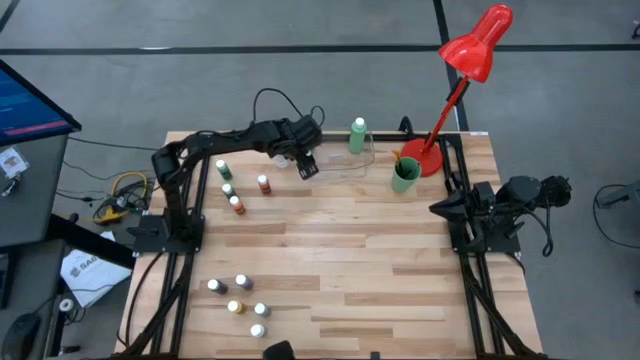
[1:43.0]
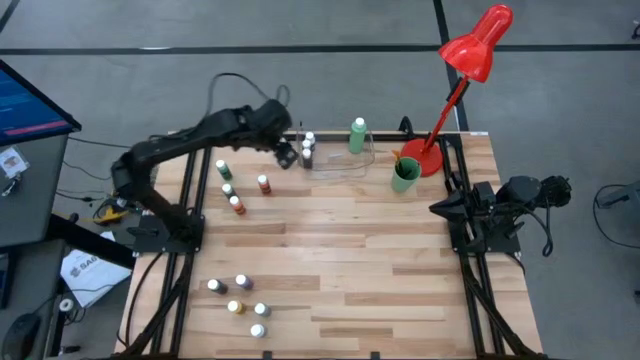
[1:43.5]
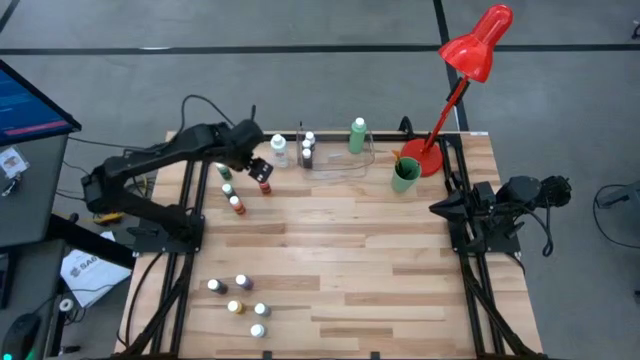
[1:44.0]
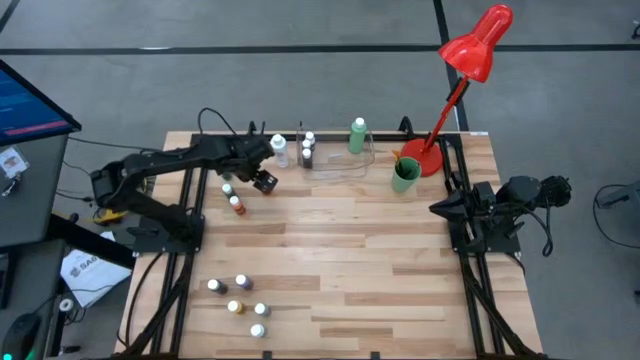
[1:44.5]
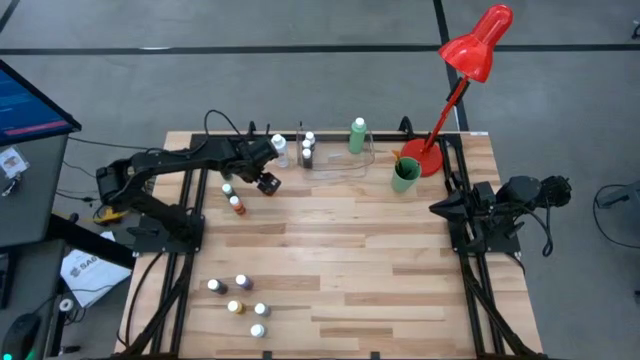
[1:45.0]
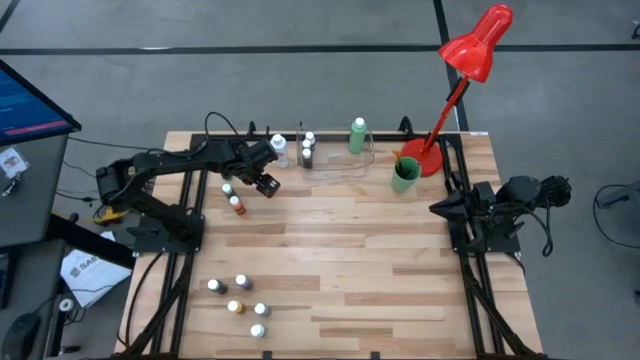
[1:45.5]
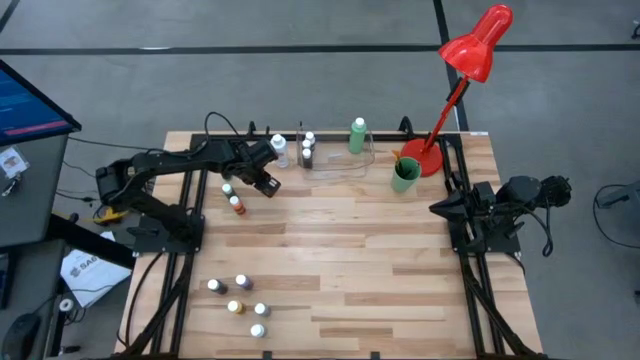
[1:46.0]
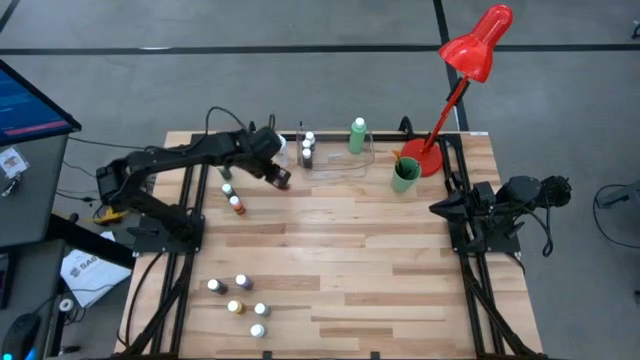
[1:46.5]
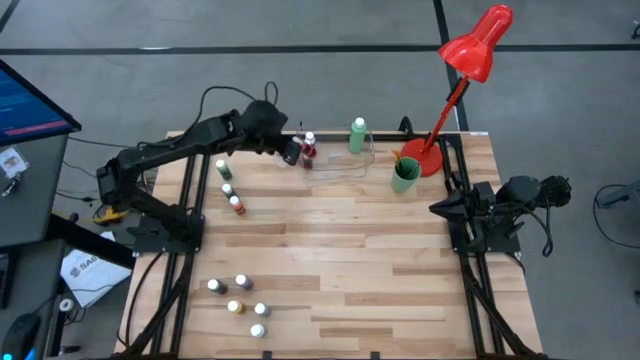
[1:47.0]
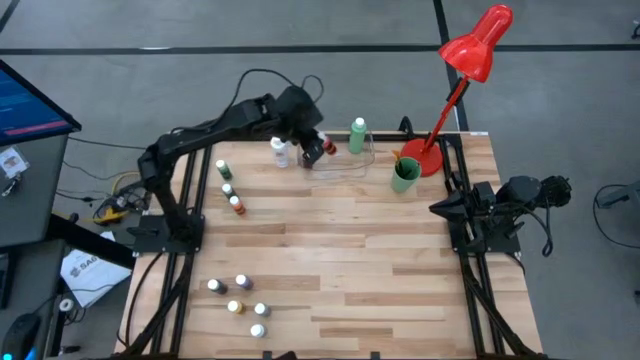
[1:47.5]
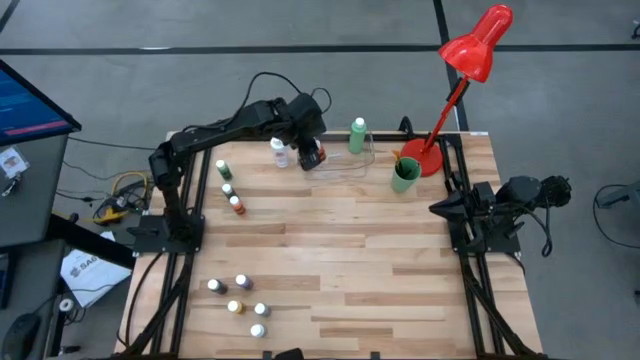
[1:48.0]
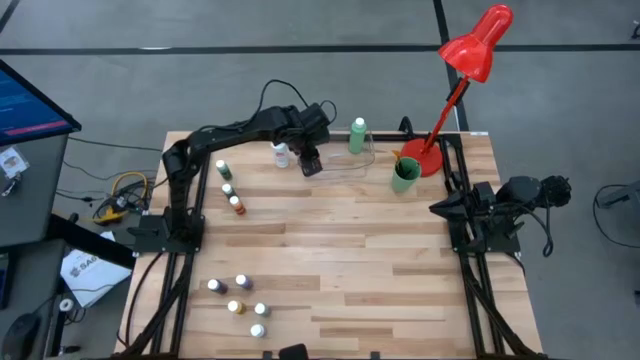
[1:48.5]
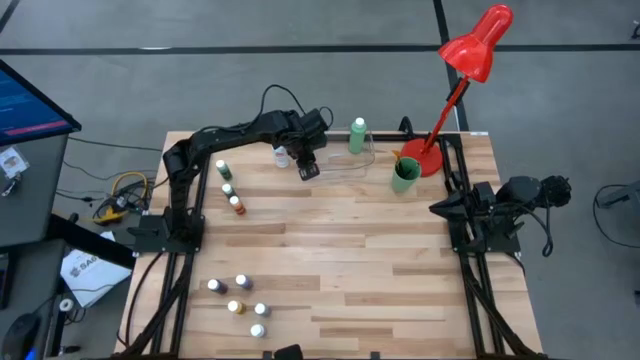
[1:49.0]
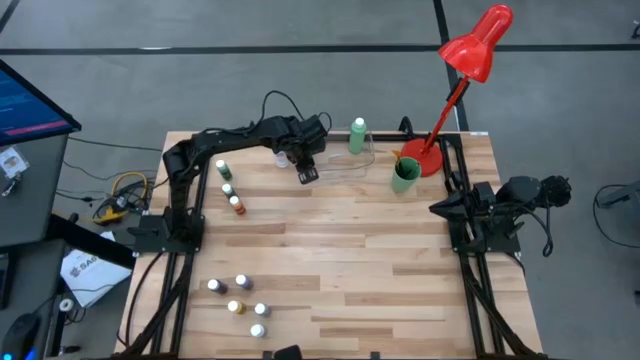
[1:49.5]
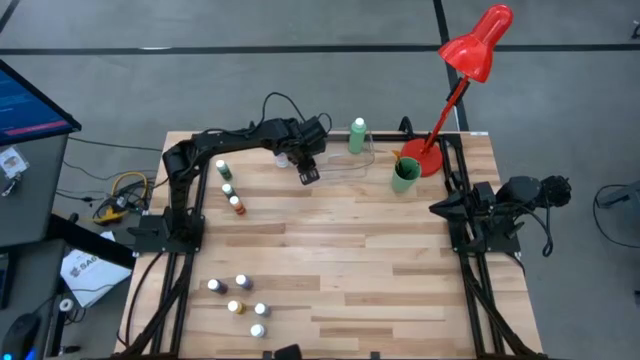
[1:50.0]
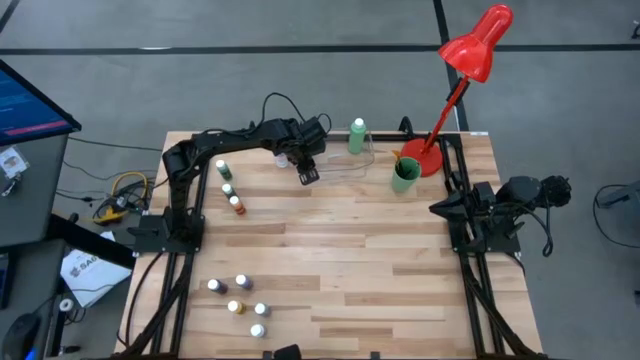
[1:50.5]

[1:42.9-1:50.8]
Task: Pick & Place Paint Supplies
Put the small red paint bottle into the transparent bin

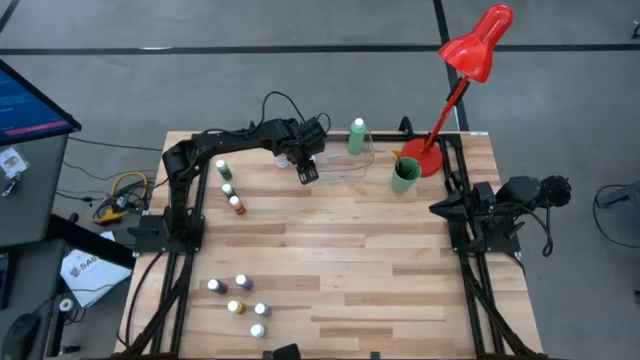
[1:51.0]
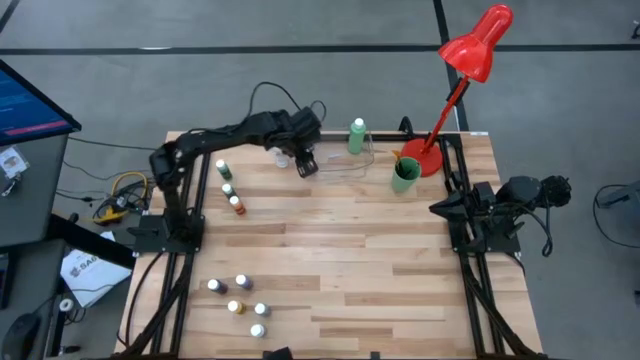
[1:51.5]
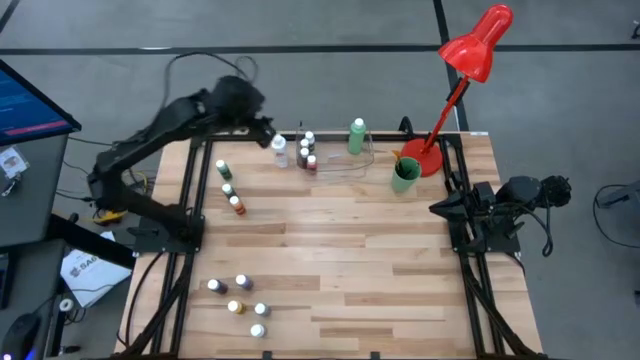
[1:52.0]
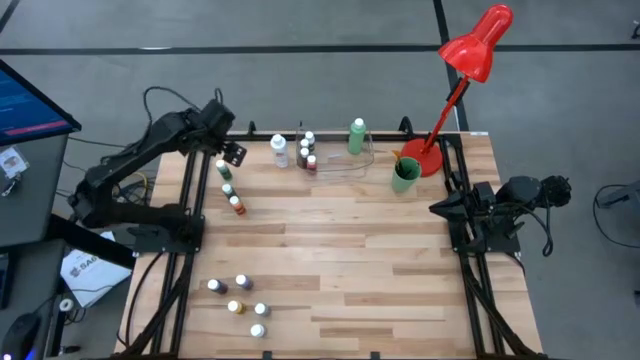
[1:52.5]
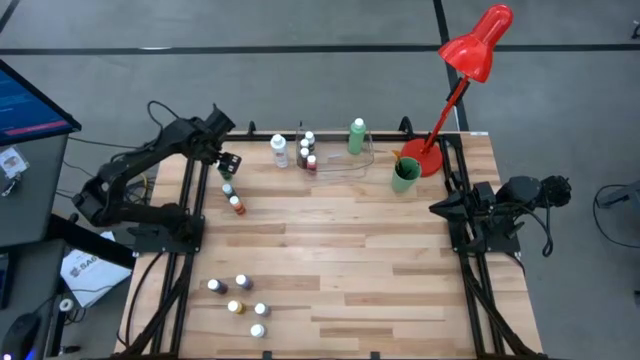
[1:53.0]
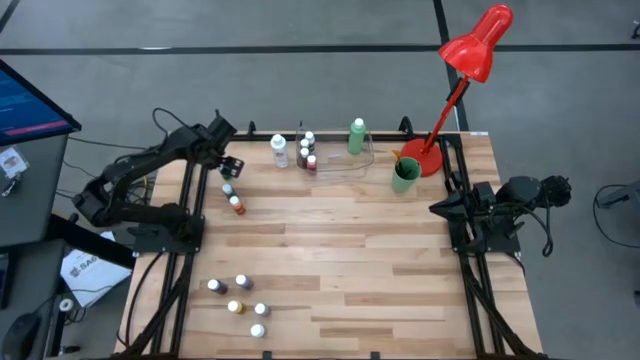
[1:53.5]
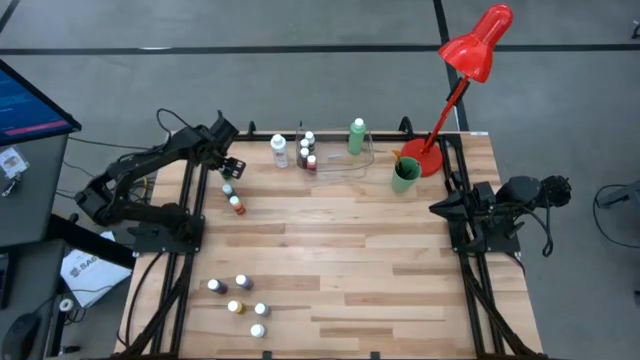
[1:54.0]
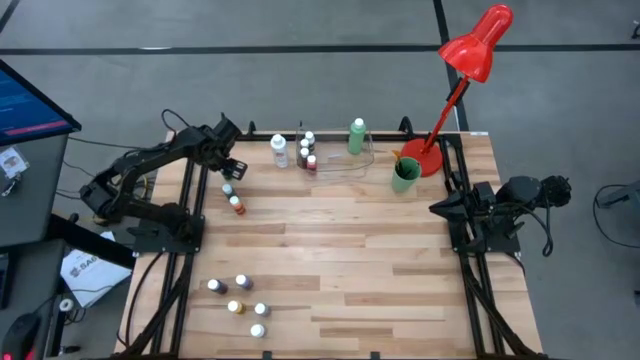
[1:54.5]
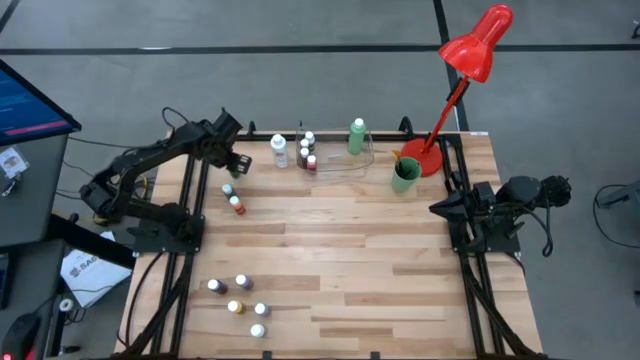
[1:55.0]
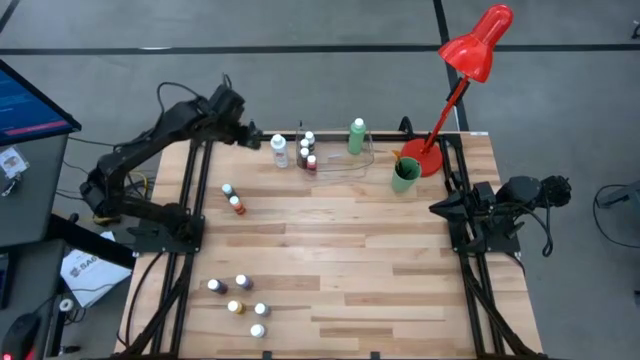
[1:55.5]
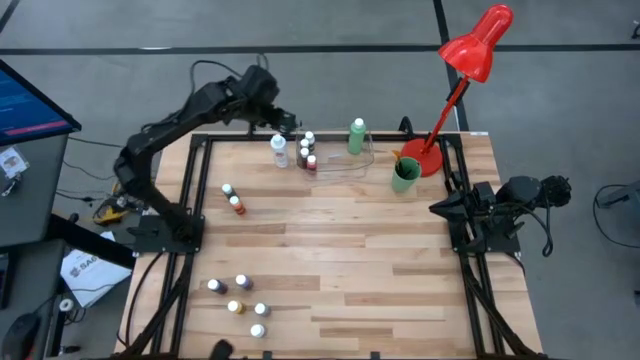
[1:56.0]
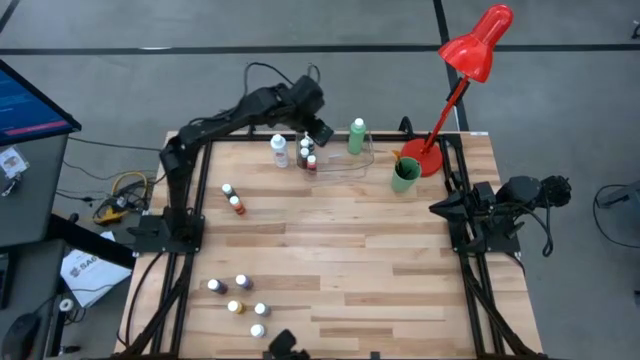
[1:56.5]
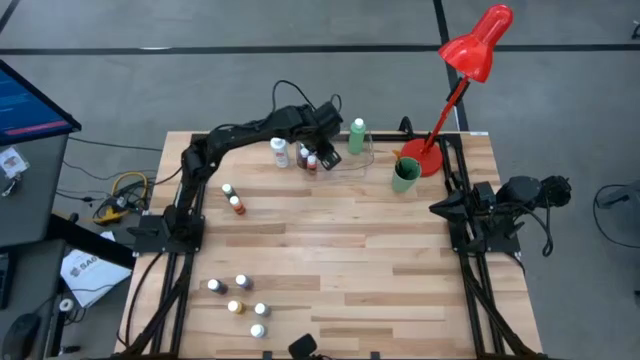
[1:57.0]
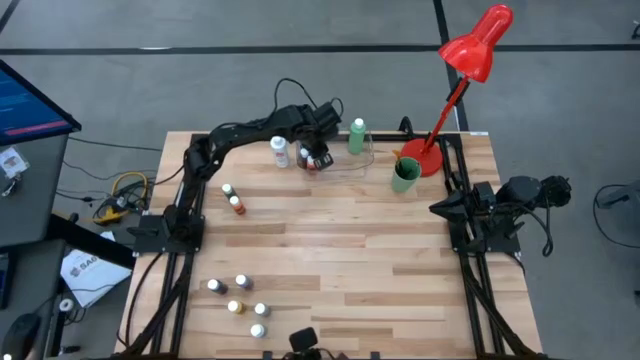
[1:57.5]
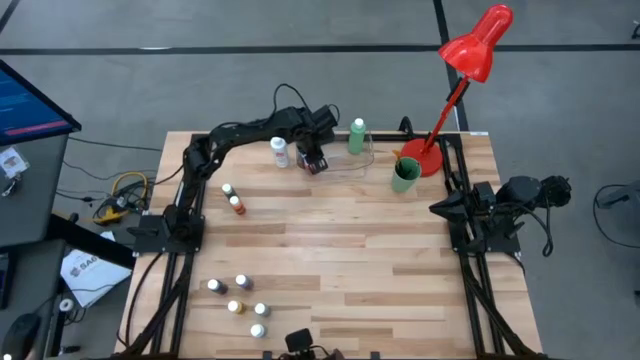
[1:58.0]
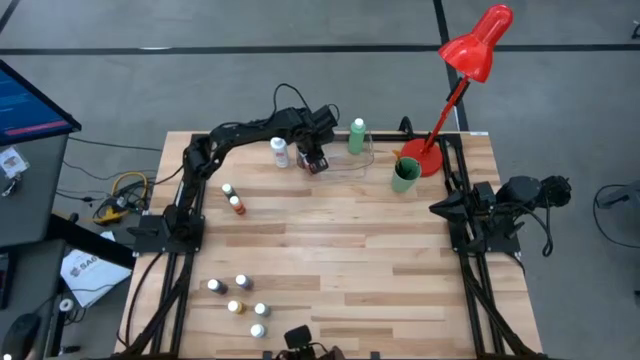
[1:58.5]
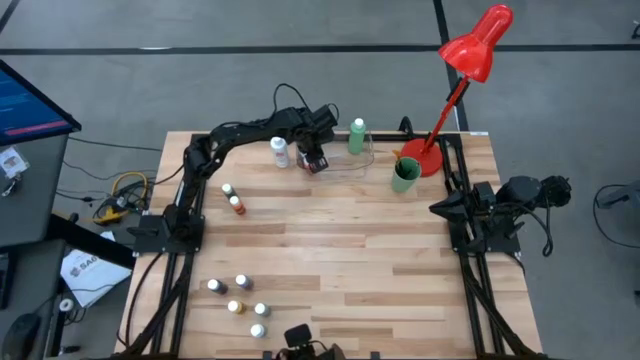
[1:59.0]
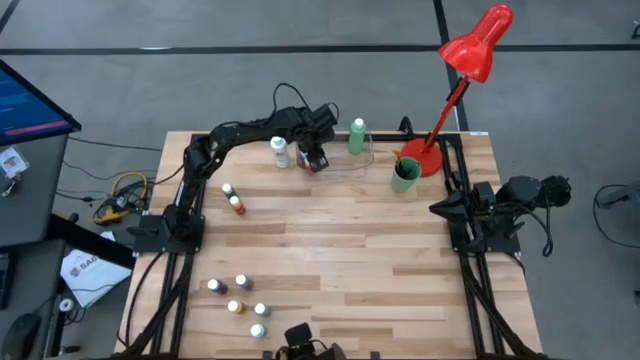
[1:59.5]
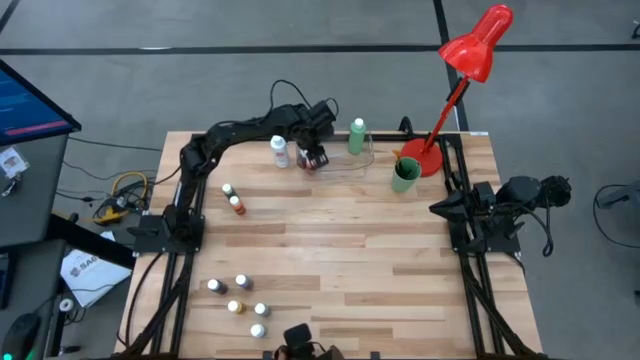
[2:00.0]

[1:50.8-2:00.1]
Put the small green paint bottle into the transparent bin

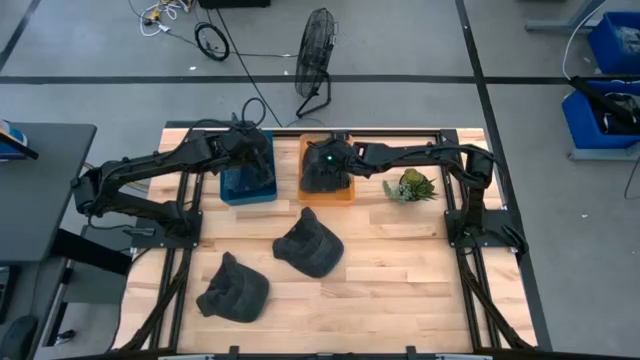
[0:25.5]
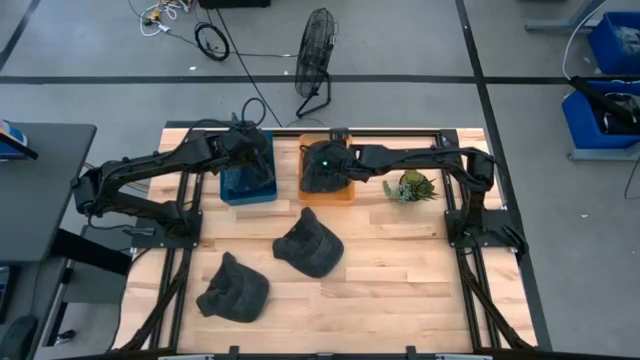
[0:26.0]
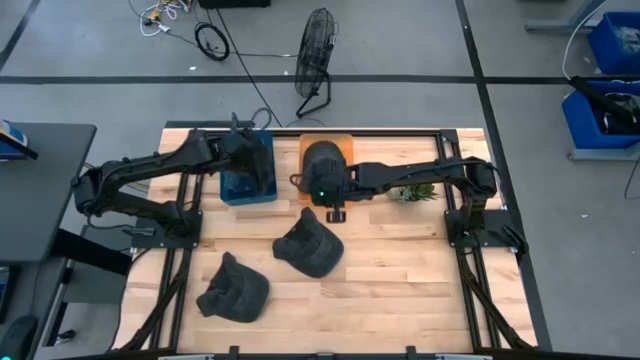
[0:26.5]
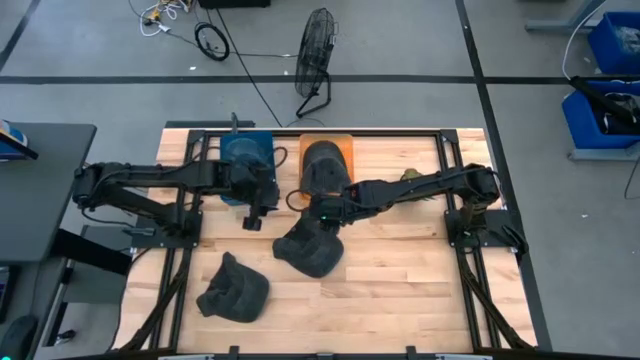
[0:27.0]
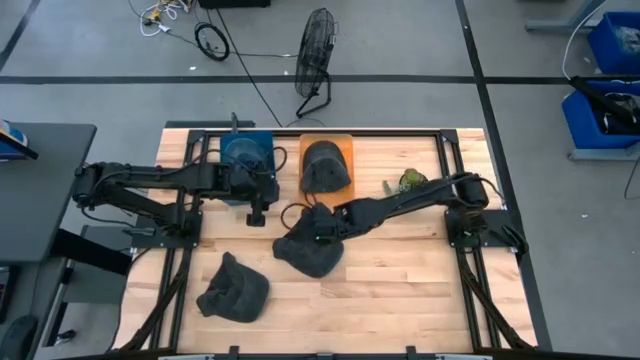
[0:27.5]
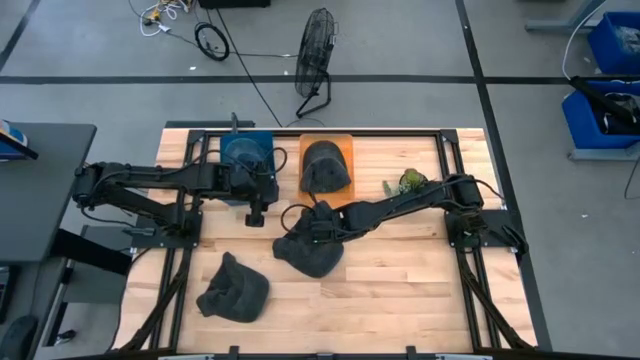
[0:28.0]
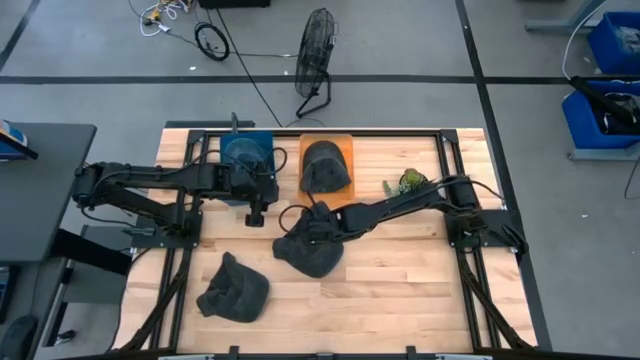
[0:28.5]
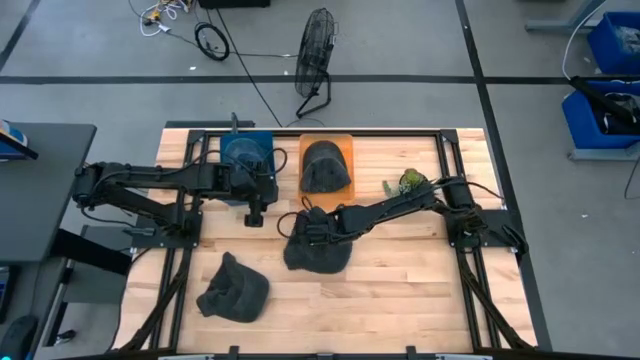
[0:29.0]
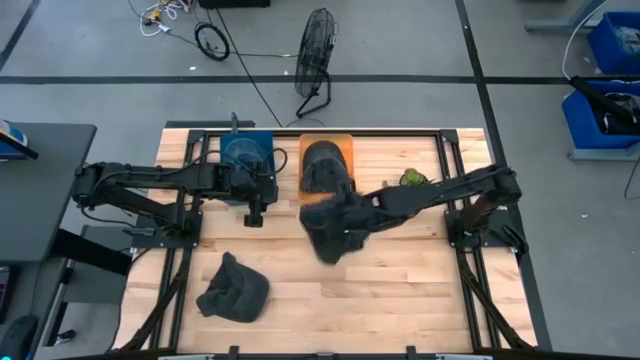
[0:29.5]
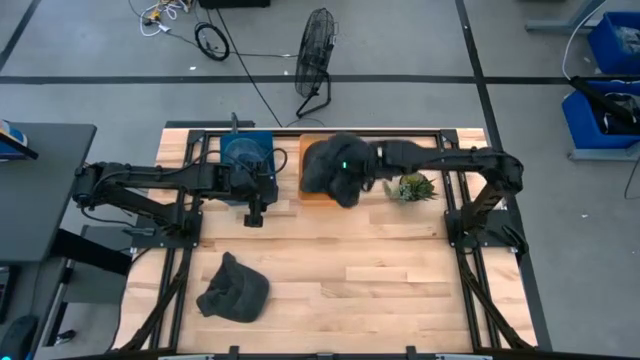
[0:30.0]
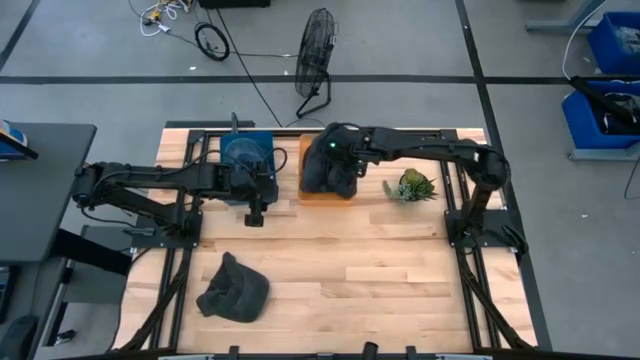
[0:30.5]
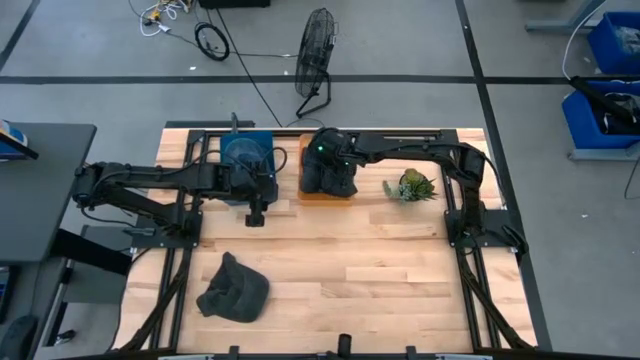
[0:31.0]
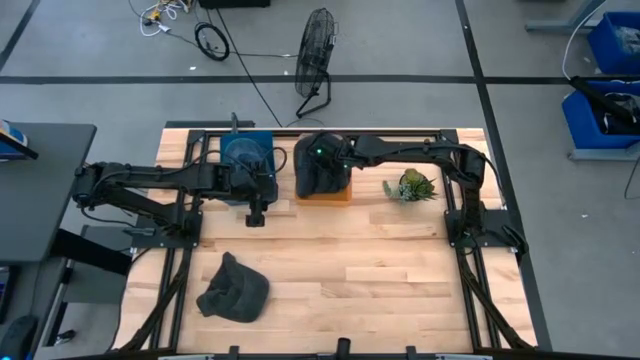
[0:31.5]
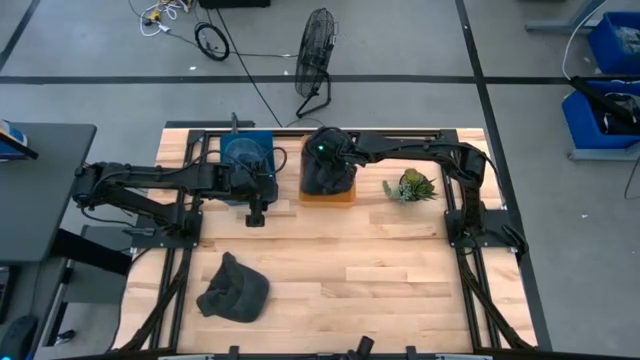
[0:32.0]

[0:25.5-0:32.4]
Task: Pick & Place hat
Put the right black cap into the orange bin
